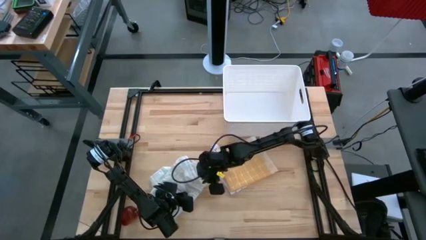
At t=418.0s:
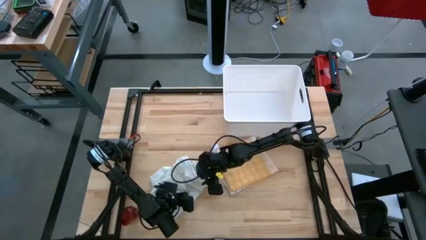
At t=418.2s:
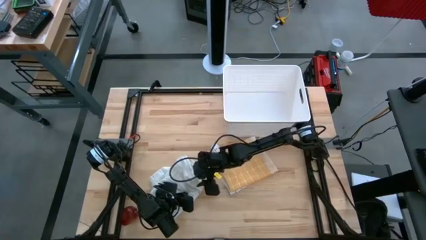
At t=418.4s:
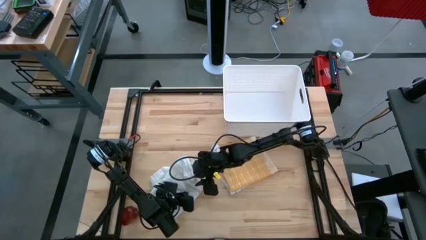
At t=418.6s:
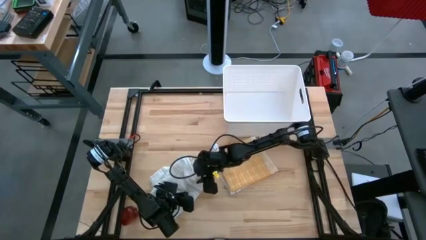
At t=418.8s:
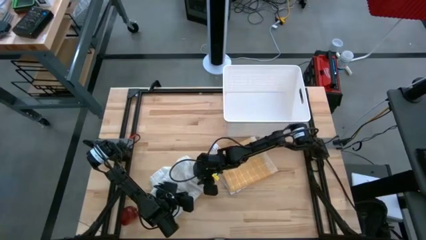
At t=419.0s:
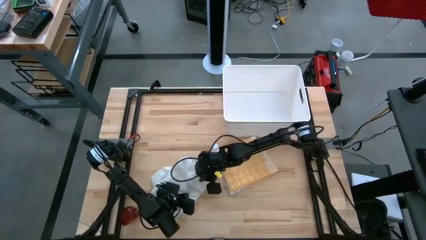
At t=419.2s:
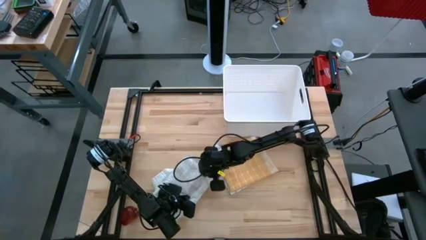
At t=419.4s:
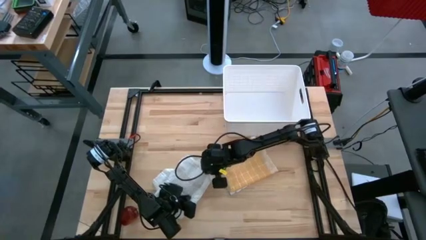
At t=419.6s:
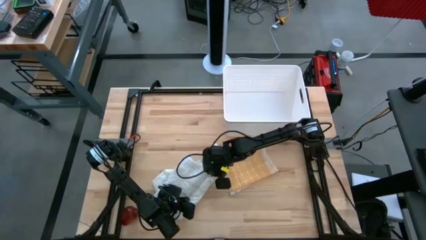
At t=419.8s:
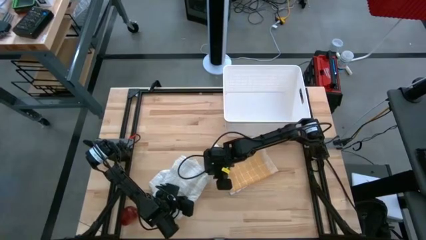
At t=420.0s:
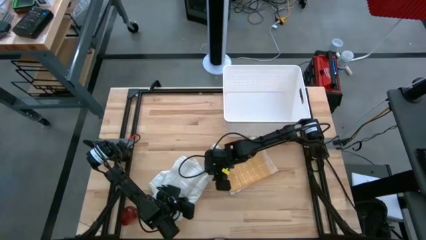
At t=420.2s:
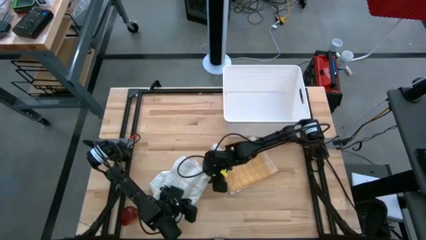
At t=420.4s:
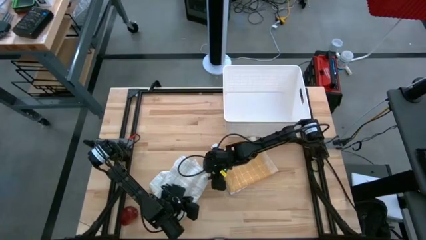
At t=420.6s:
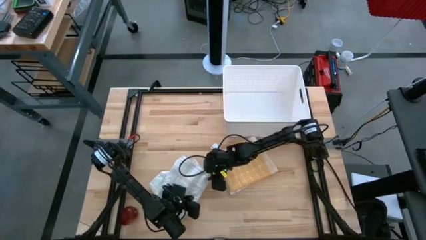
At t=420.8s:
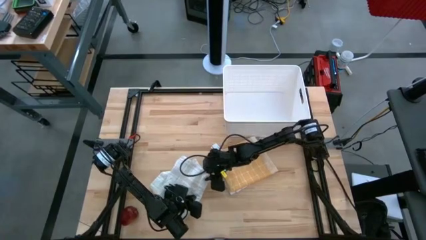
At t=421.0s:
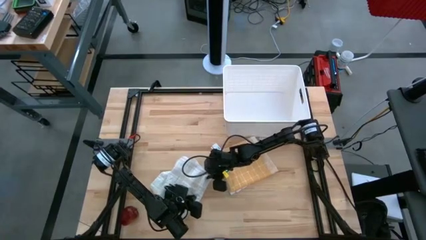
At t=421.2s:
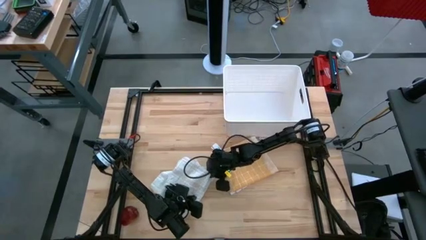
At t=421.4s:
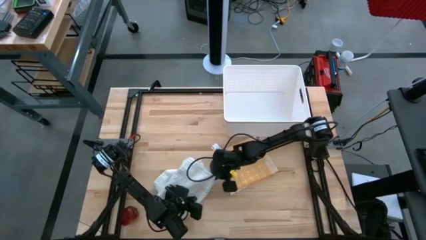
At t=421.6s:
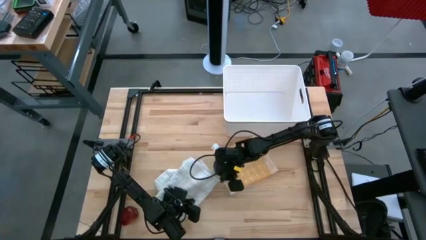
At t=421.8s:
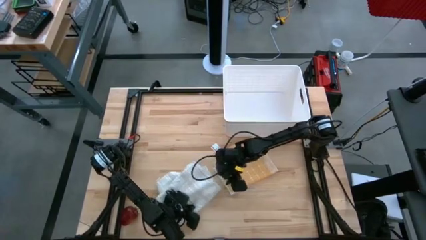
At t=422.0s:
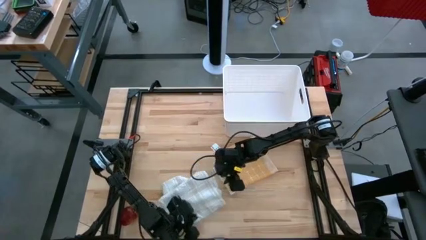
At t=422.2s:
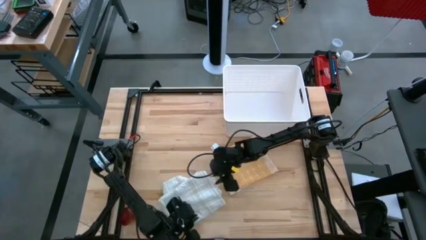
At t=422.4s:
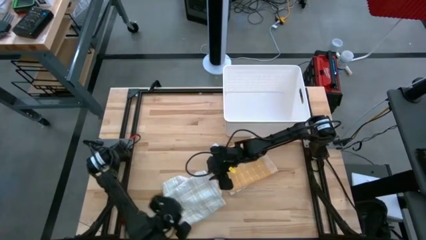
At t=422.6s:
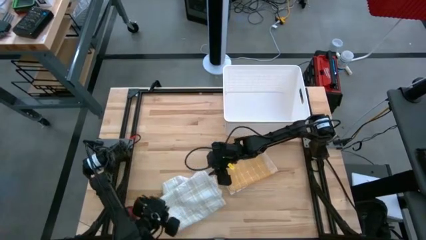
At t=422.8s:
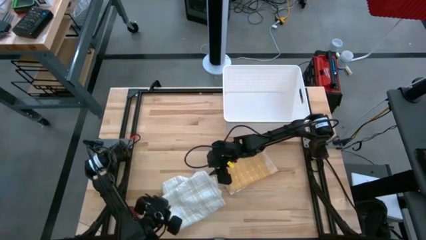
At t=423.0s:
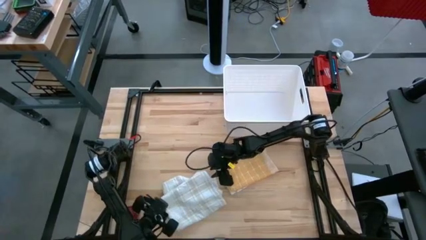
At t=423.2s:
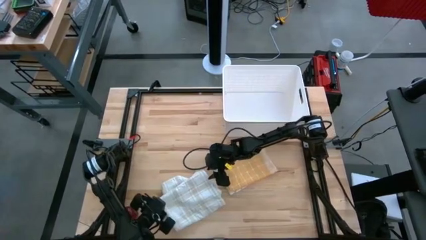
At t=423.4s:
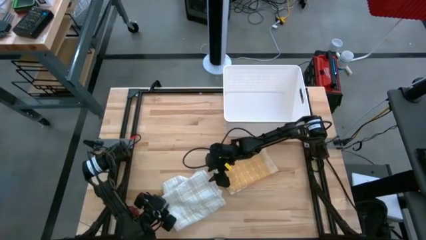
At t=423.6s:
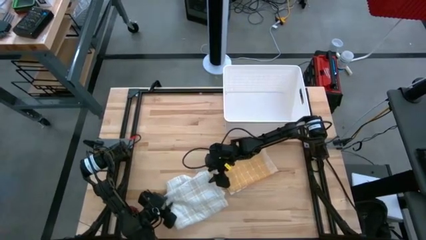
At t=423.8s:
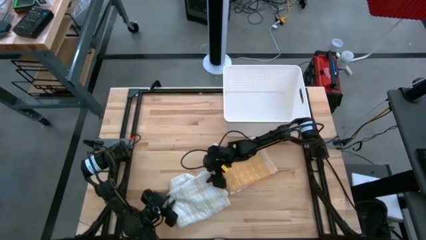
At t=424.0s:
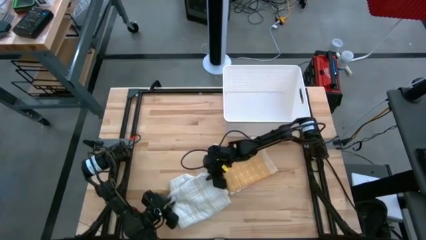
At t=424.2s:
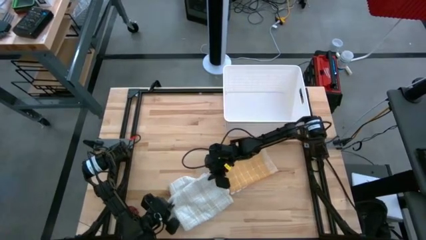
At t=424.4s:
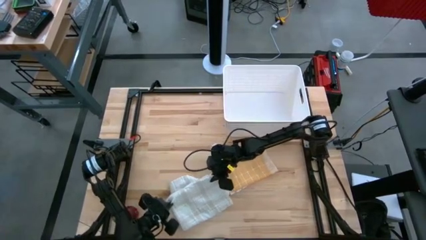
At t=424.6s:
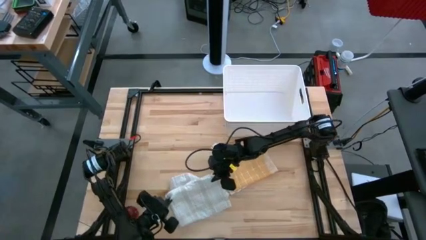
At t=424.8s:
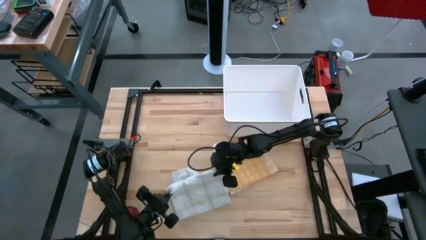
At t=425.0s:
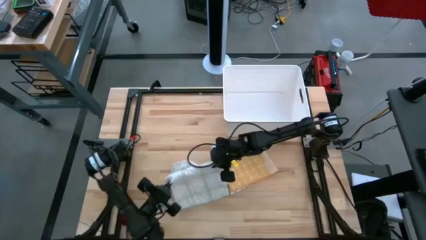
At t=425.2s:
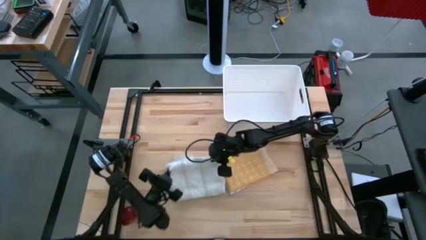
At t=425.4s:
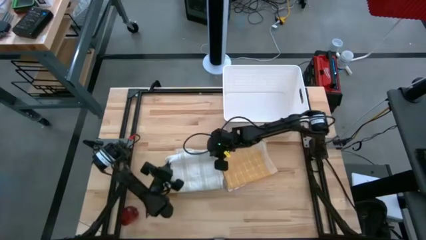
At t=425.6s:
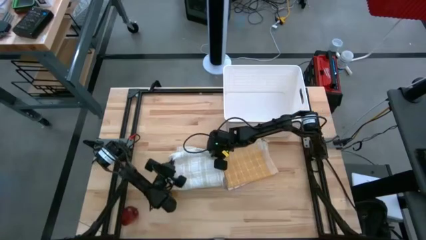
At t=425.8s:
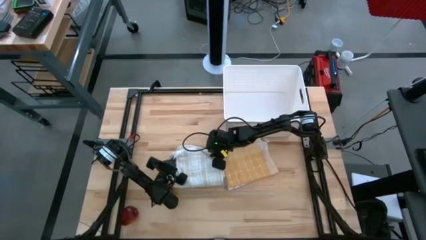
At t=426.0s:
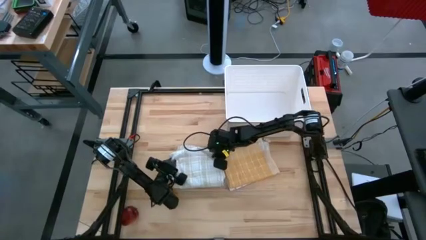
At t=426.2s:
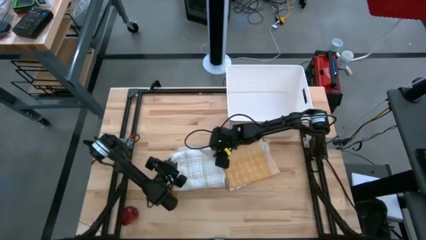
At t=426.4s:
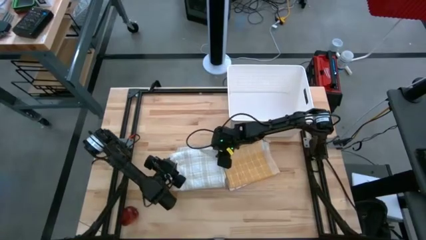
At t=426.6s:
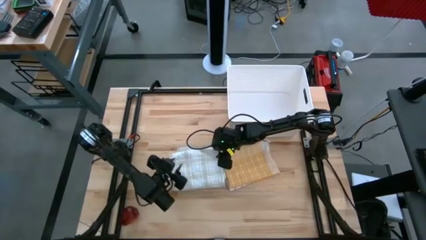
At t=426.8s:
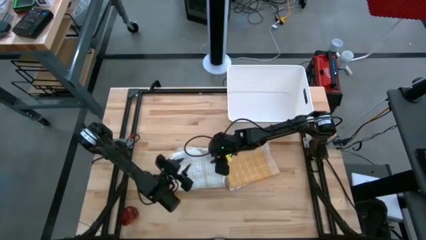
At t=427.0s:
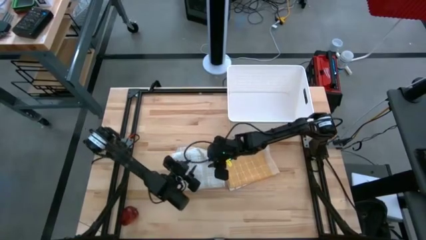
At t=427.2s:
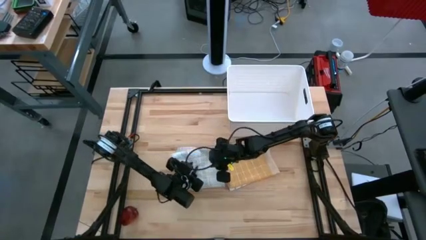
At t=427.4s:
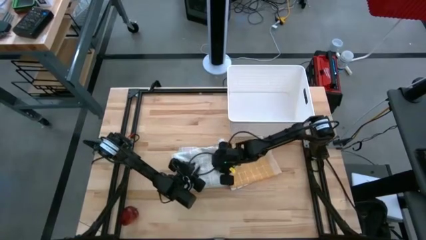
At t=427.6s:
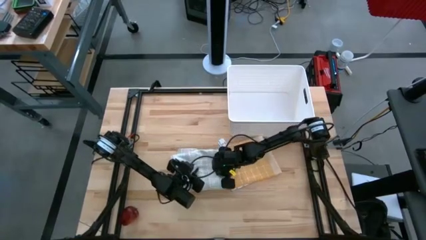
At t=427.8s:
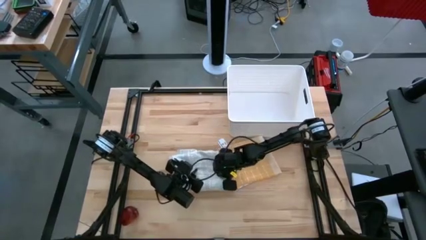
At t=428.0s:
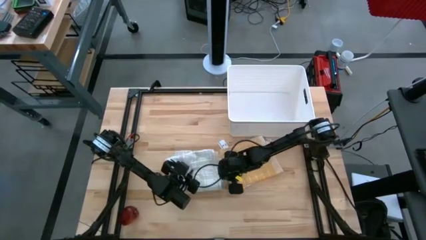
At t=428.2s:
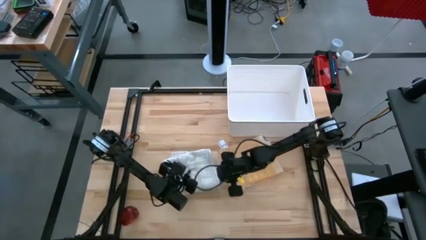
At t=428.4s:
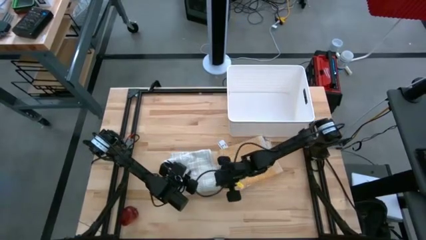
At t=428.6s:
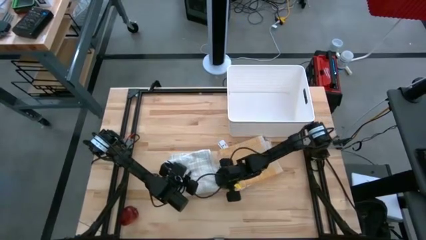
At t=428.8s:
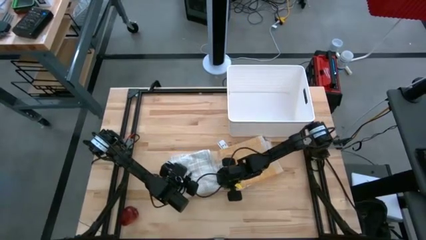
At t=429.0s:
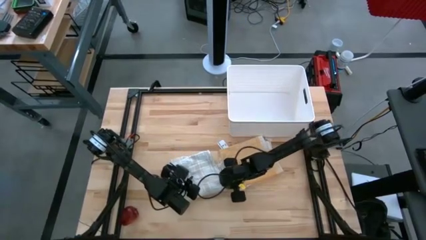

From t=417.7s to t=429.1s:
Task: Fold towel
Fold the white checkered towel

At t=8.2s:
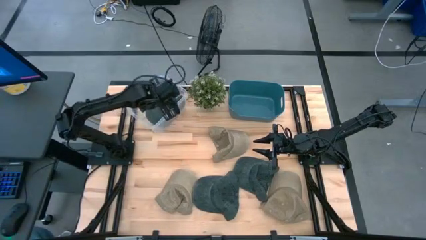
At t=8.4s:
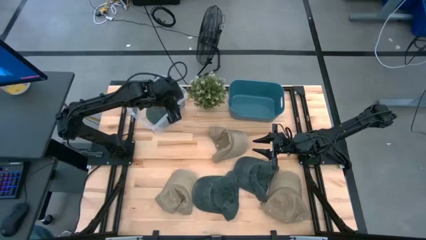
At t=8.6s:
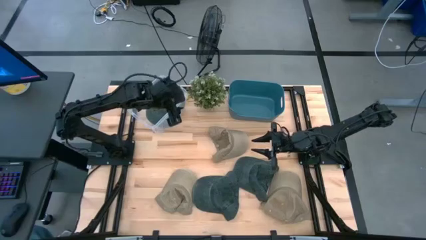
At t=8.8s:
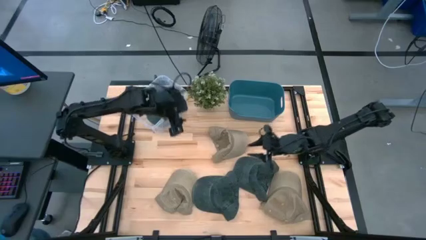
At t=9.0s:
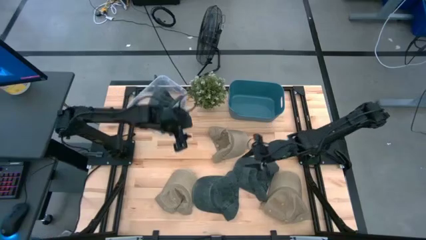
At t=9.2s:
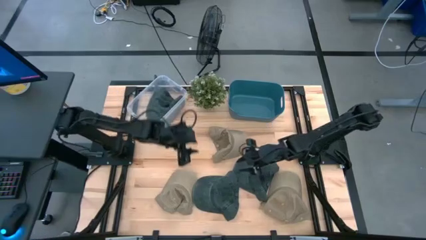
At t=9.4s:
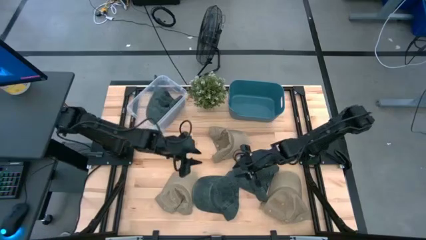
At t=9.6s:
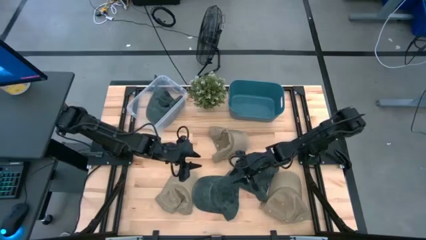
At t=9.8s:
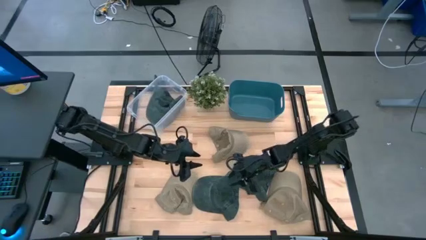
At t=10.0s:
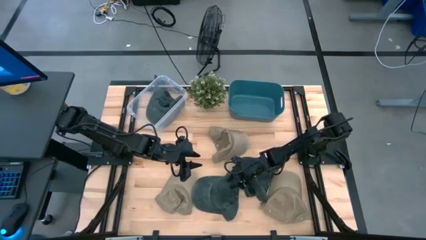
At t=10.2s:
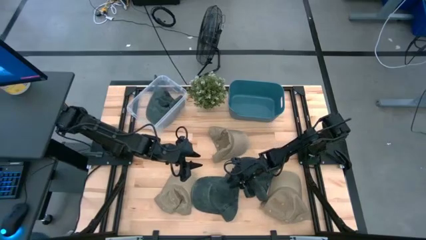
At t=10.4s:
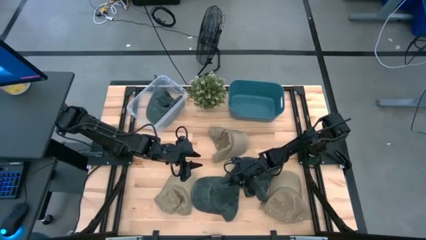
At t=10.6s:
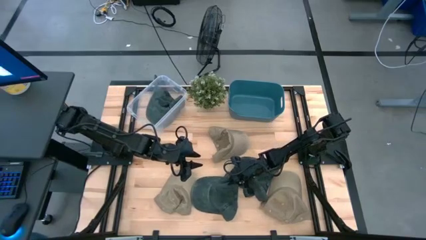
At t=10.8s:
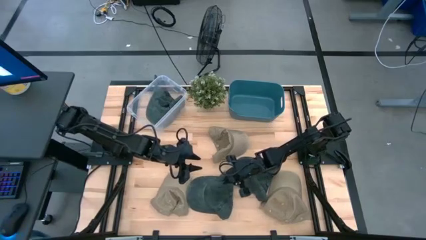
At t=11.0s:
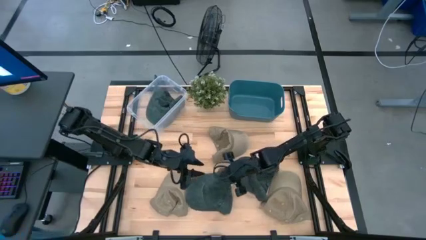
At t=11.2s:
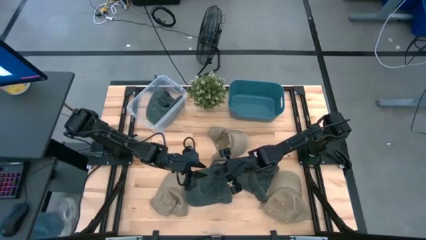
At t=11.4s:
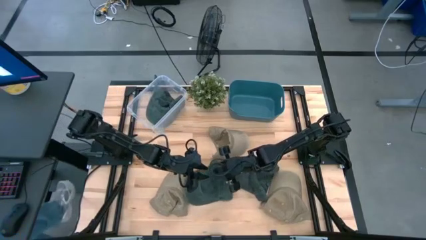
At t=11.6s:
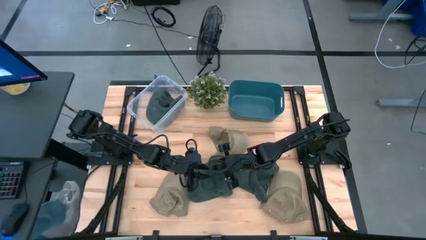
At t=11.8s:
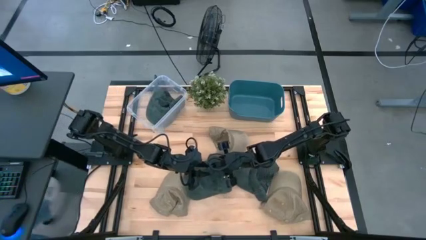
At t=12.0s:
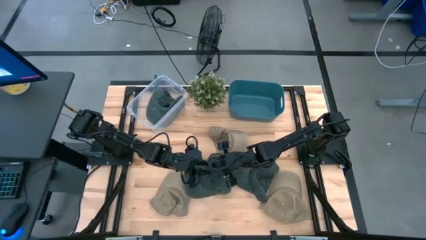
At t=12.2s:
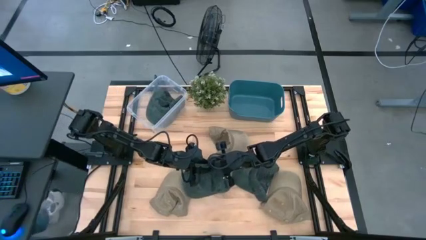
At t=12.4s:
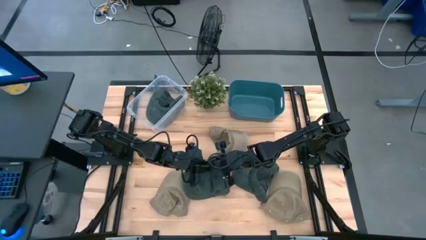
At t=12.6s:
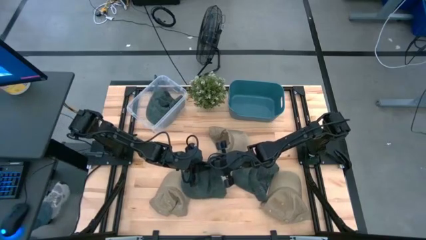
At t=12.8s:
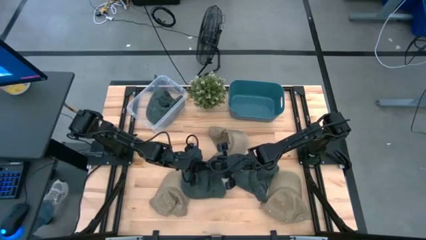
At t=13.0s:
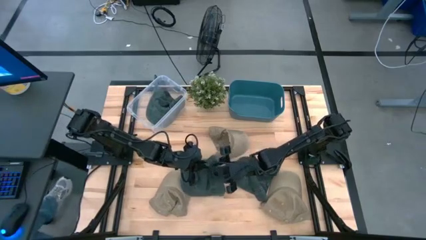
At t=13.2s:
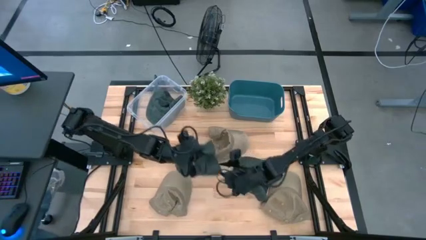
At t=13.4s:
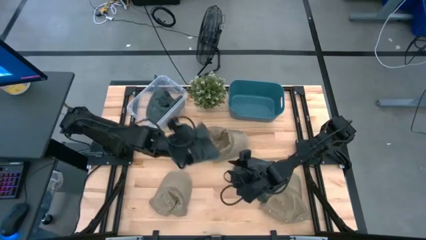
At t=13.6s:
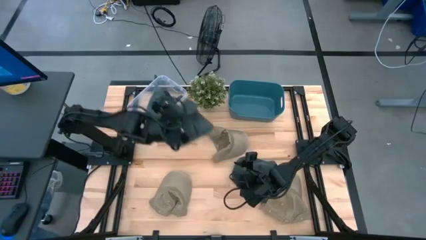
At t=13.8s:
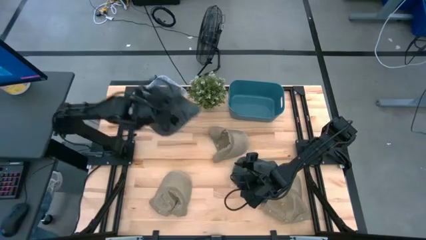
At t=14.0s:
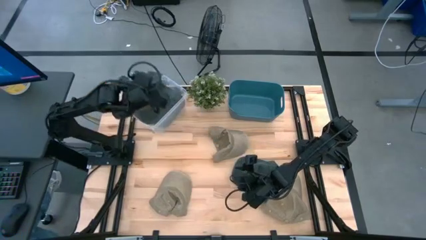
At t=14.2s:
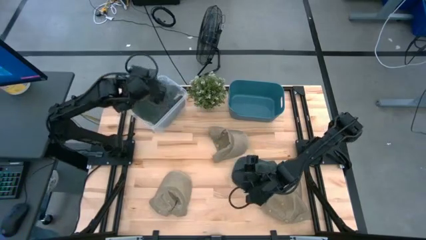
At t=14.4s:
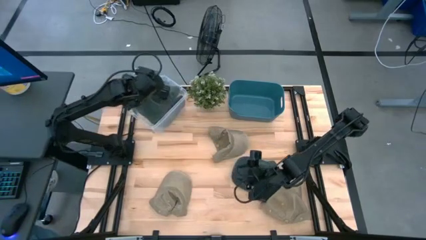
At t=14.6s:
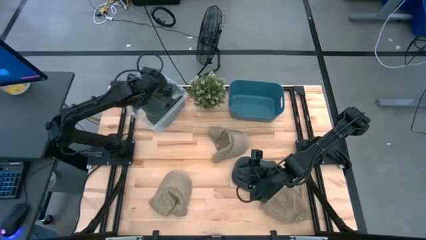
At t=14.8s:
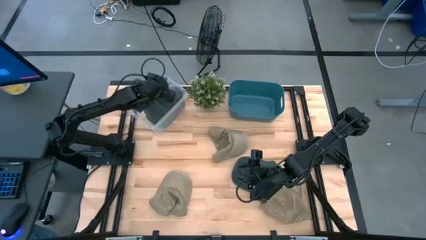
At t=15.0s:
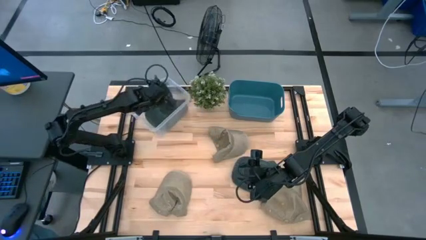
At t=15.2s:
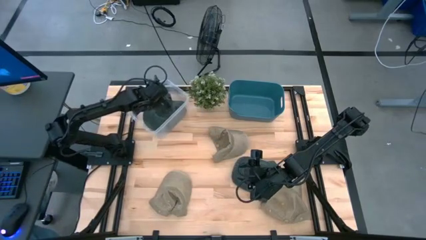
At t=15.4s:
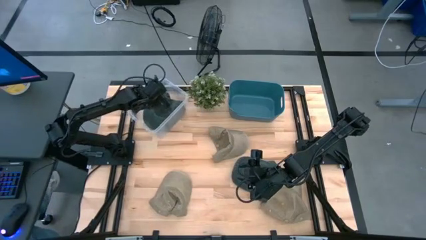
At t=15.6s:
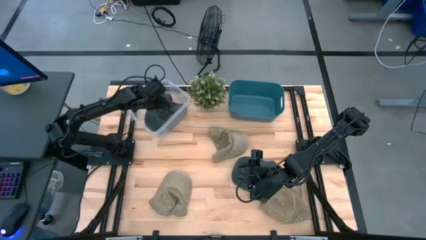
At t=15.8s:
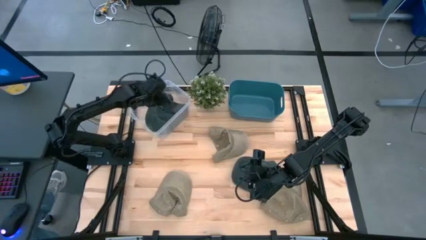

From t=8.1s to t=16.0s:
Task: Pick & Place hat
Put the left gray cap into the transparent bin
